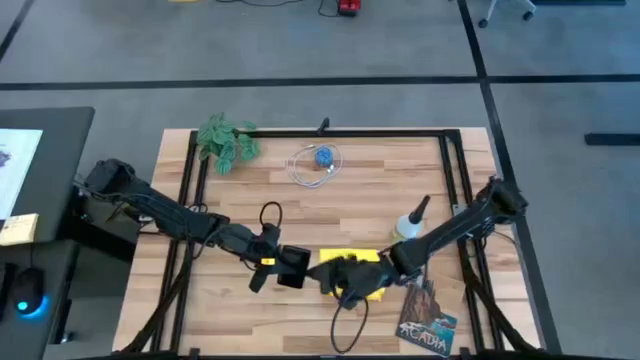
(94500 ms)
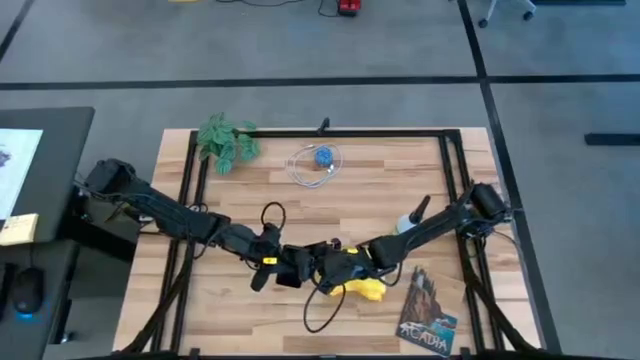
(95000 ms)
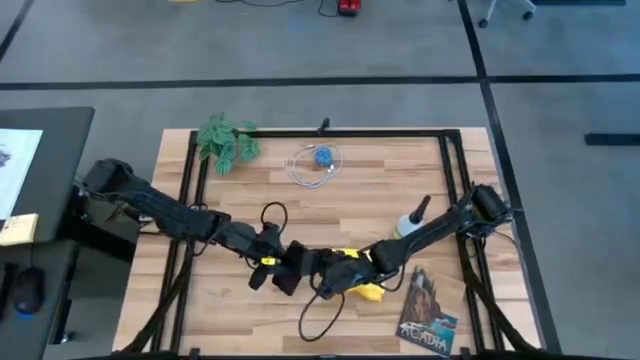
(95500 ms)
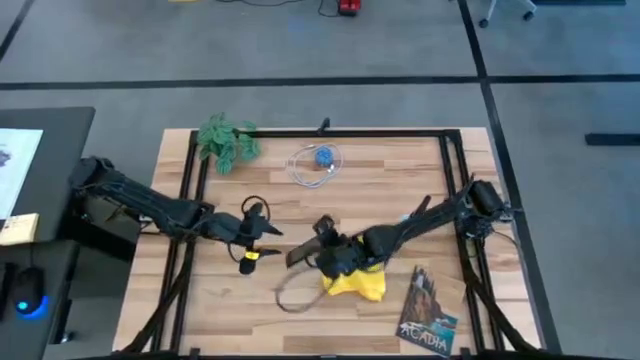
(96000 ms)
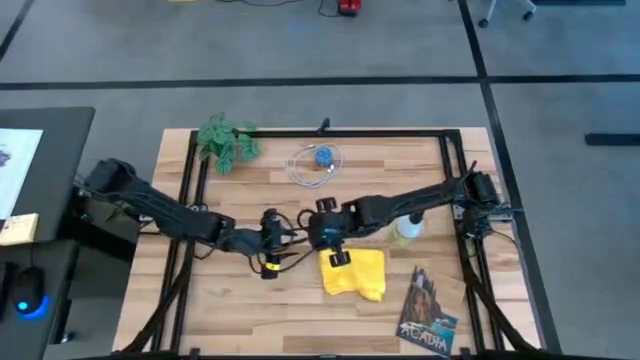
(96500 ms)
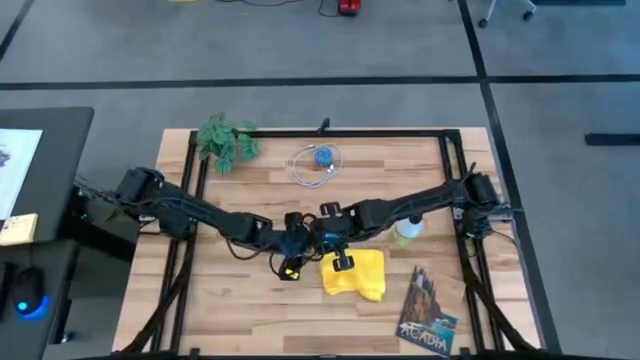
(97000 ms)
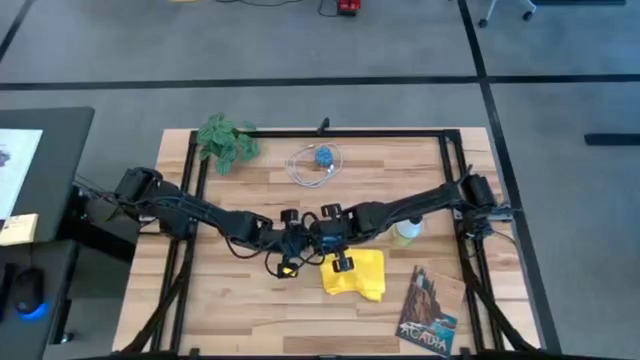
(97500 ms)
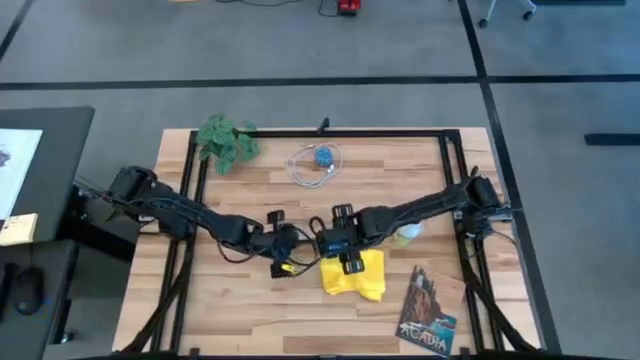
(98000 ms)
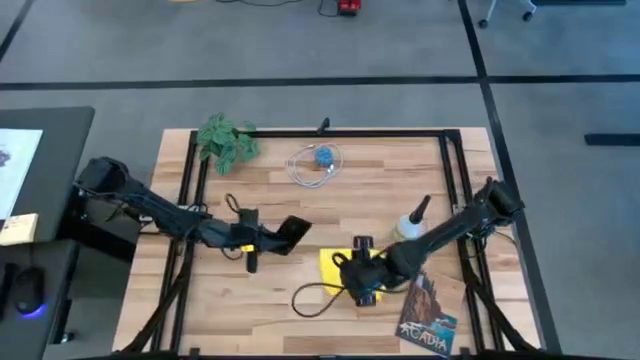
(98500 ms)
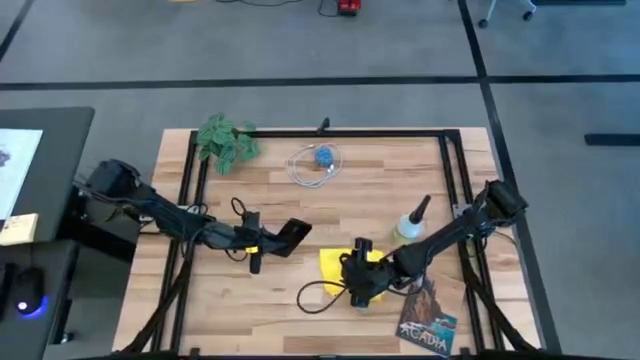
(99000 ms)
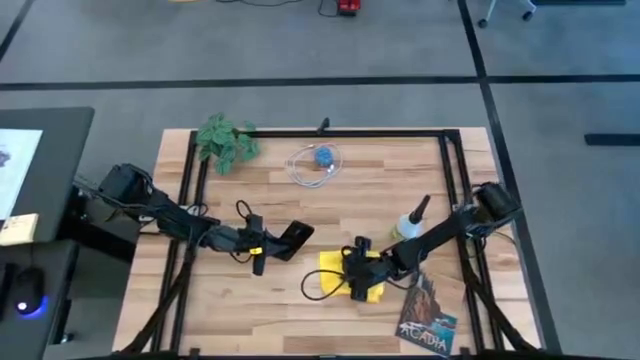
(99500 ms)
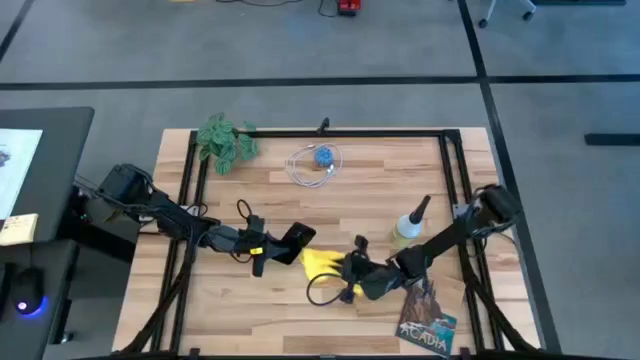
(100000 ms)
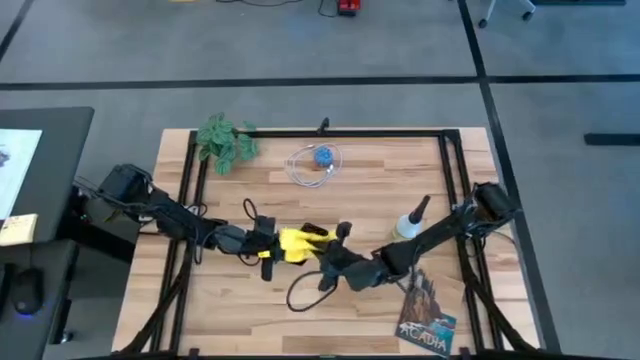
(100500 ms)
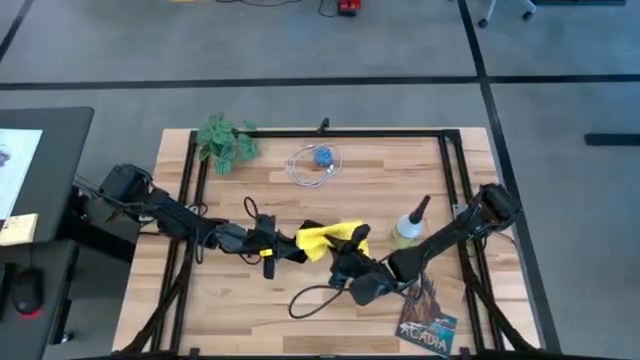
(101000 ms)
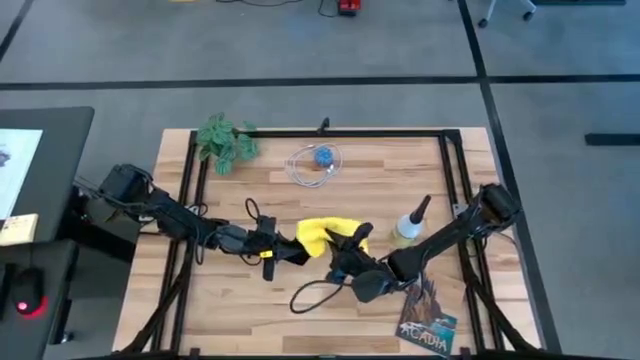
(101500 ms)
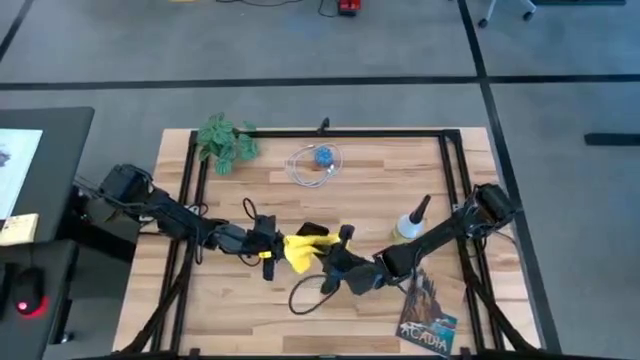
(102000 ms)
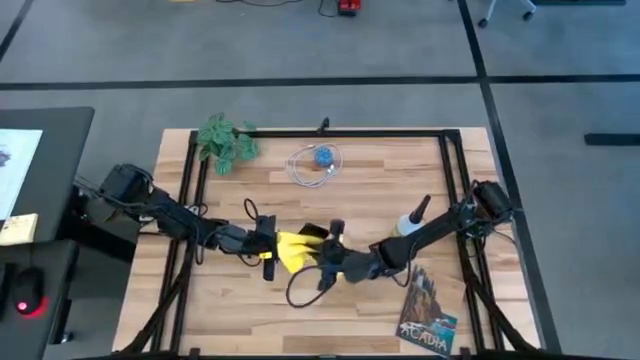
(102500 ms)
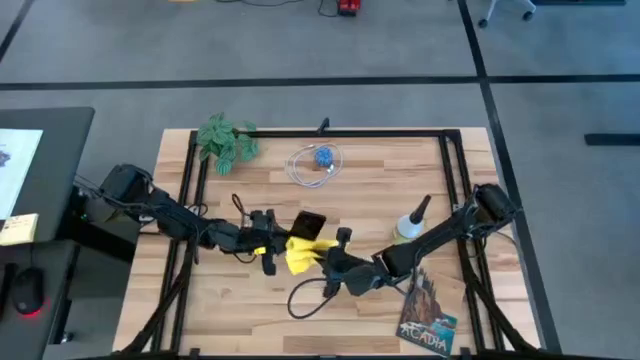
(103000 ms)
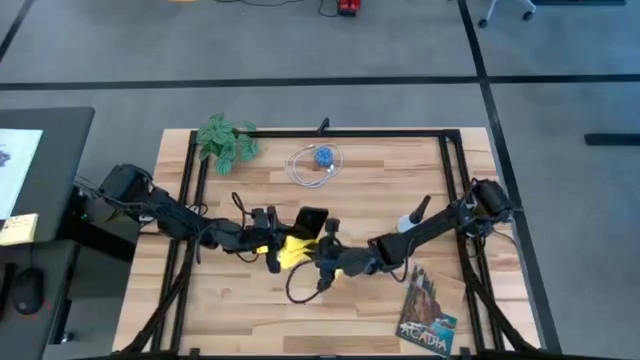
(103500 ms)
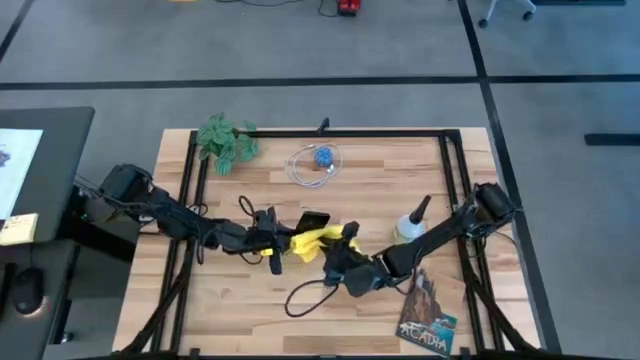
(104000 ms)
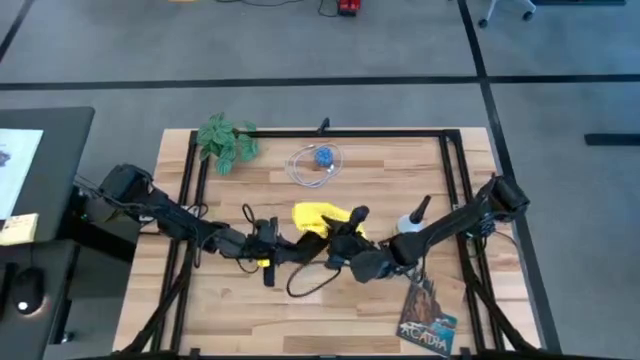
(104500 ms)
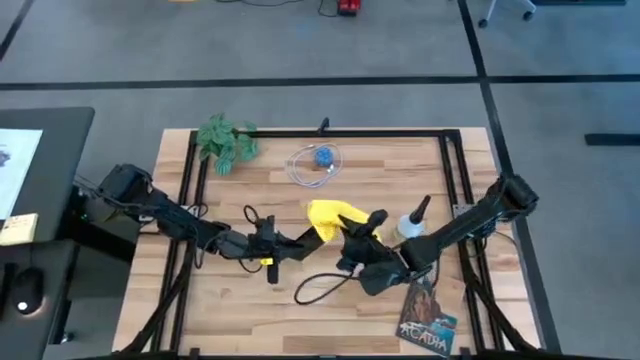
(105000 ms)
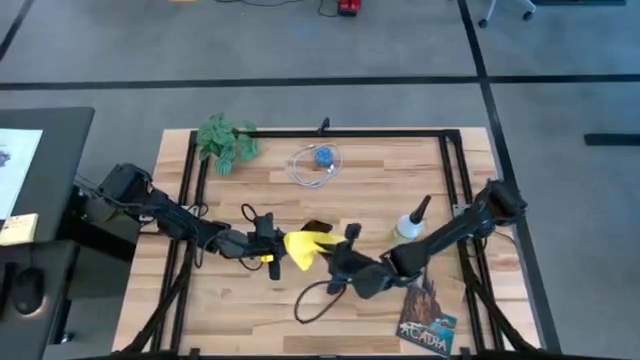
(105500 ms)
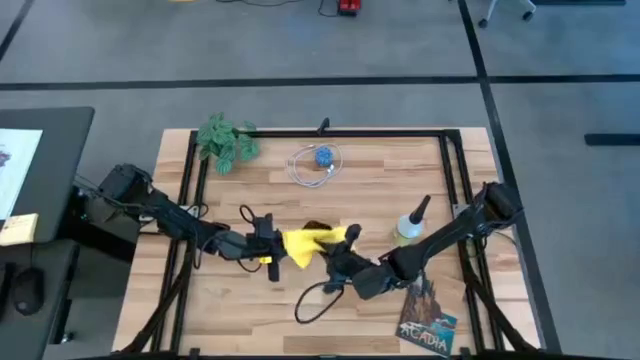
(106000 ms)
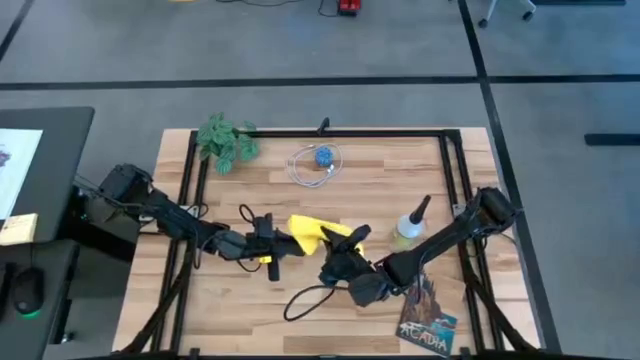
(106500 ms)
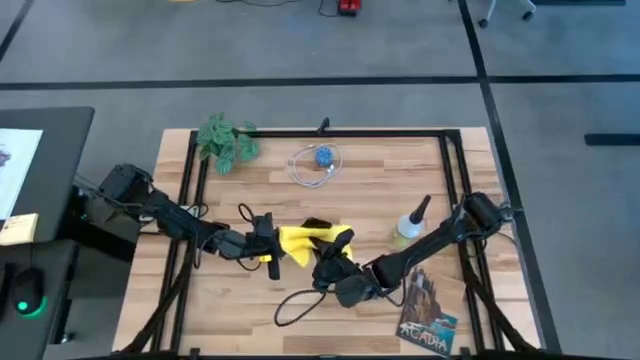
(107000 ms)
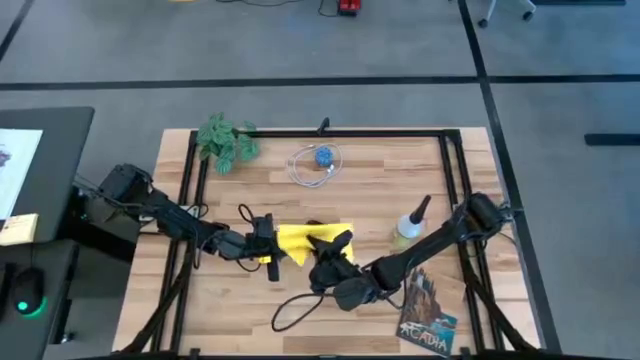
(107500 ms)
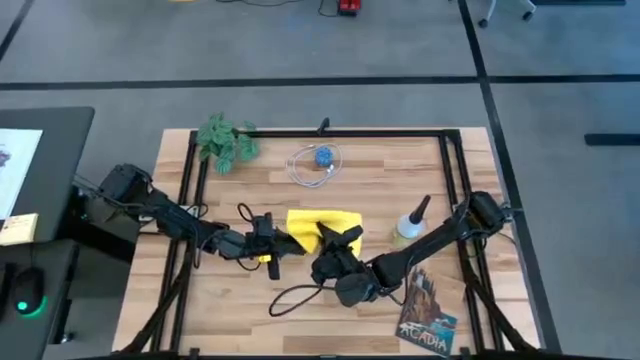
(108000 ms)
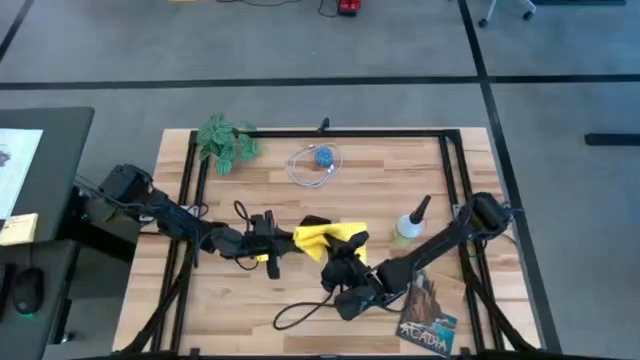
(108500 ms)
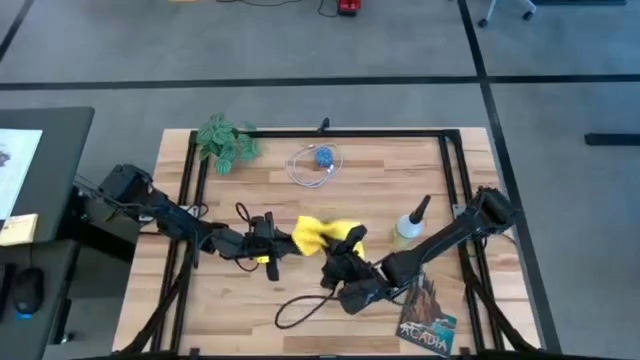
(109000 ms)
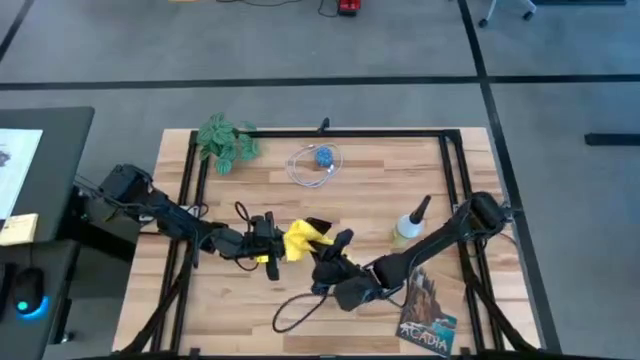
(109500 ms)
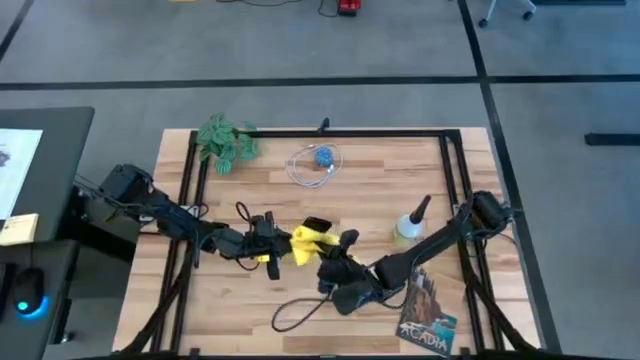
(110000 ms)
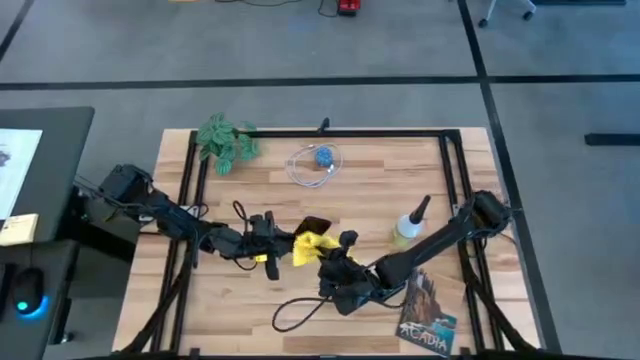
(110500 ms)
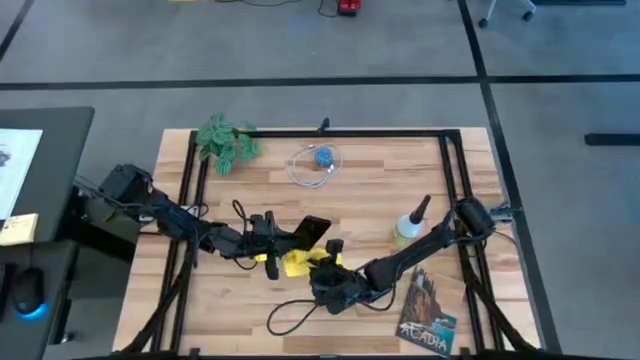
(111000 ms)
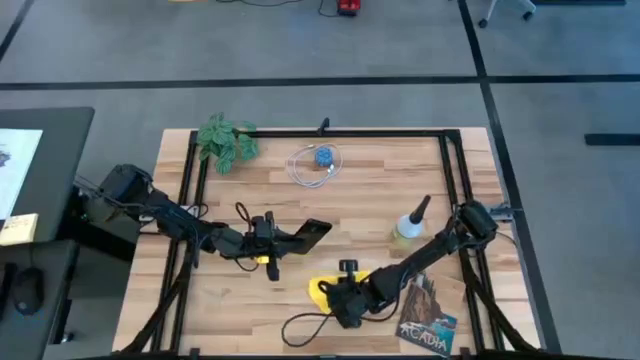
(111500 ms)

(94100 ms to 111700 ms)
Task: Apply microfiber cloth
Wipe the front of the cellphone using a microfiber cloth
